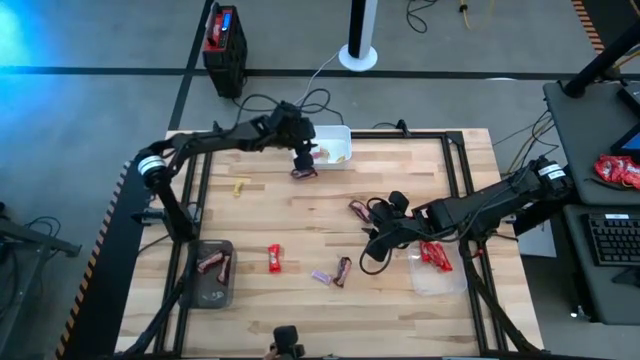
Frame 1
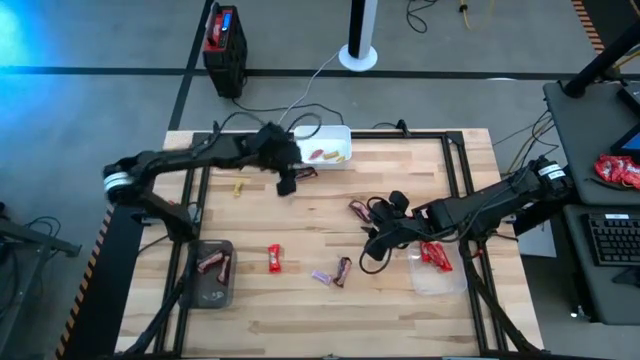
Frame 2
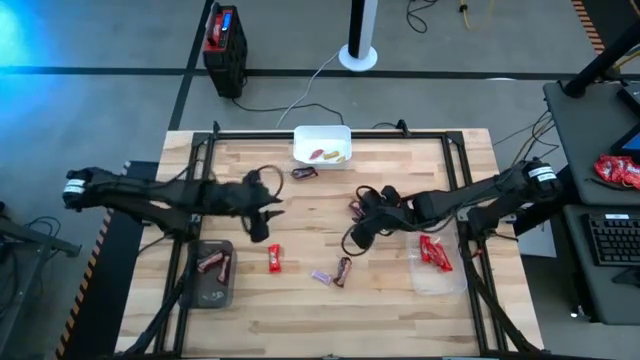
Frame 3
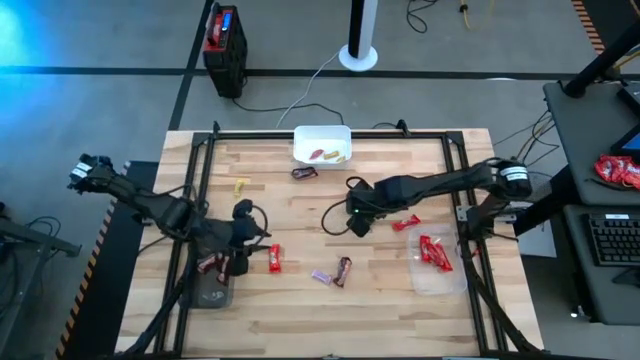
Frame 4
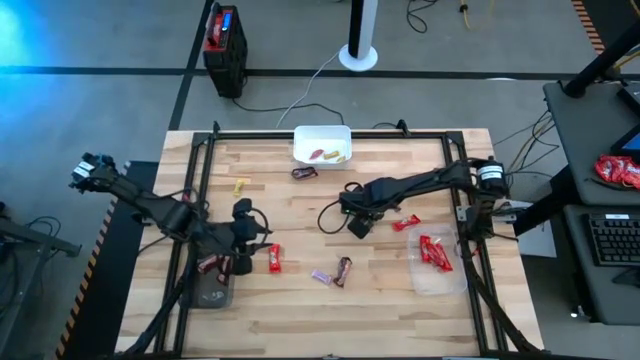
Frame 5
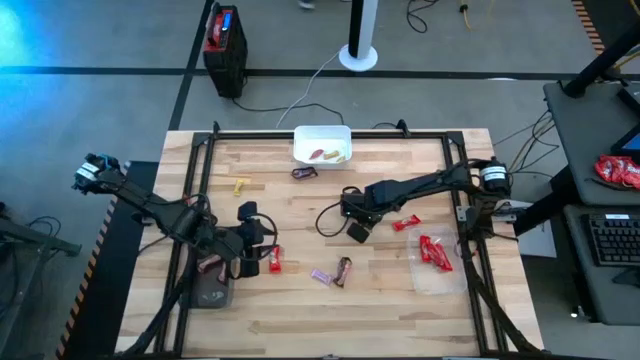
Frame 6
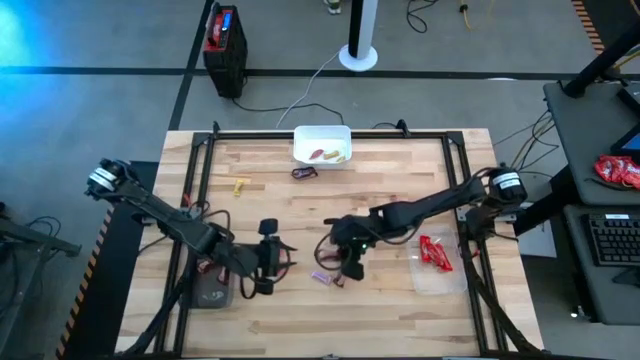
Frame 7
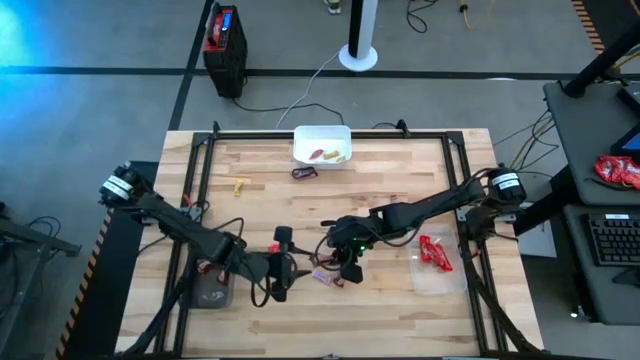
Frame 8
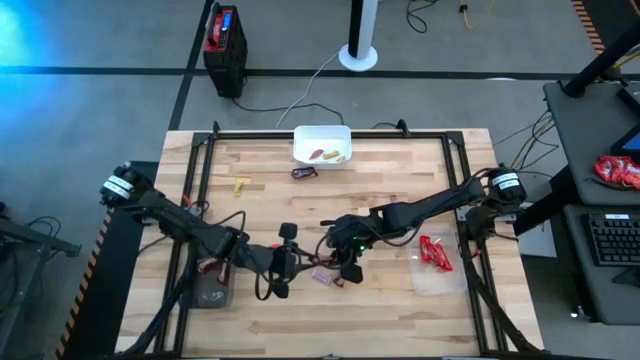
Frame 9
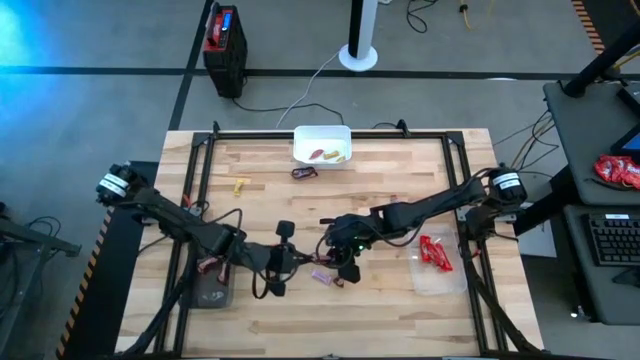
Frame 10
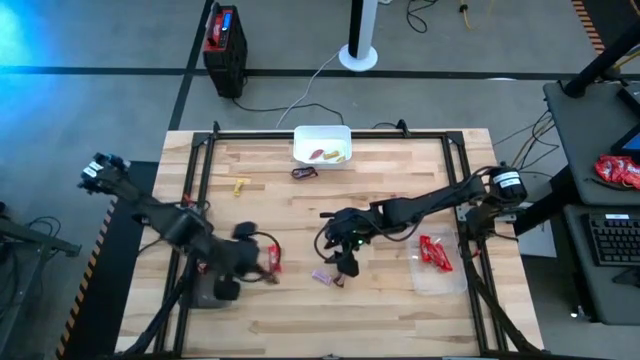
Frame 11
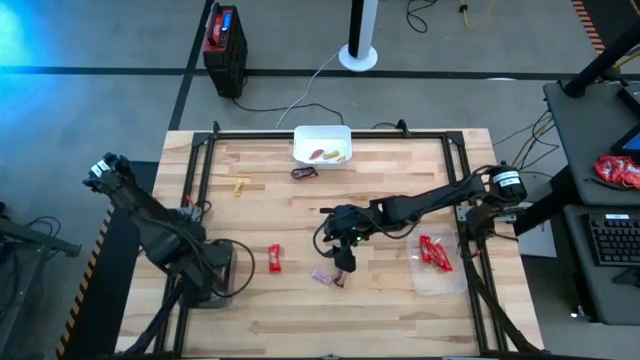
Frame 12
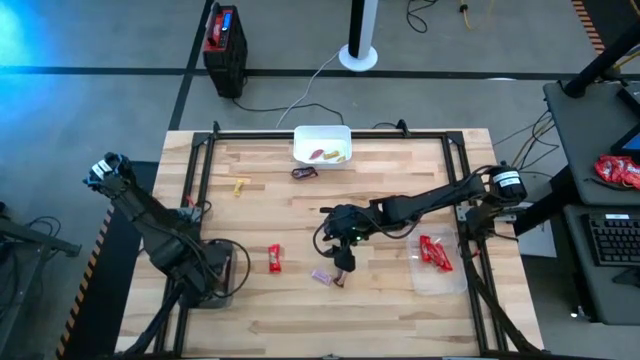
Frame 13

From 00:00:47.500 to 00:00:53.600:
Task: Sort candy by brand, put in halloween buckets
Put the brown chocolate bar into the black bin

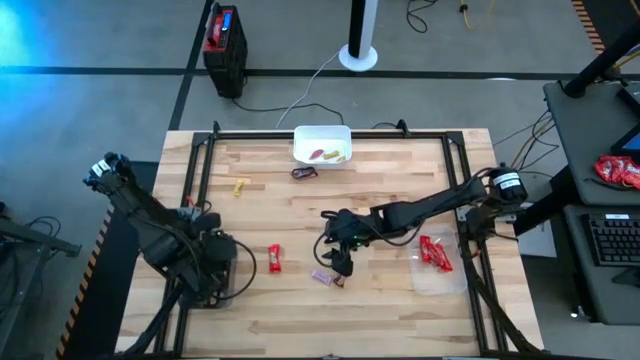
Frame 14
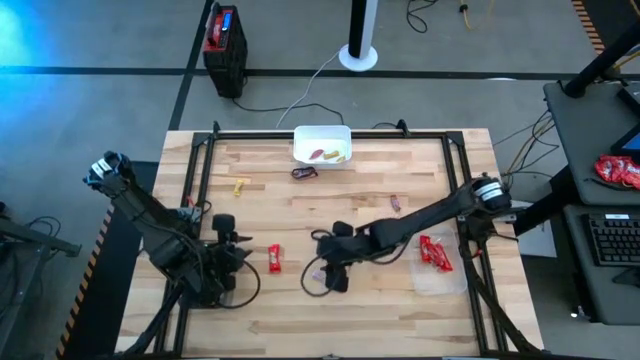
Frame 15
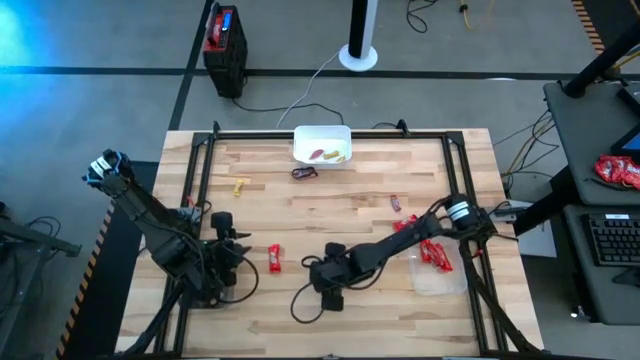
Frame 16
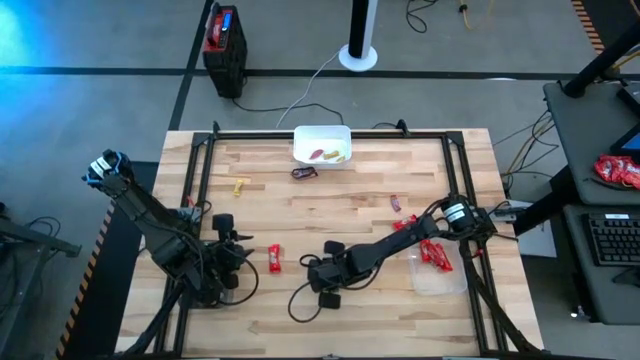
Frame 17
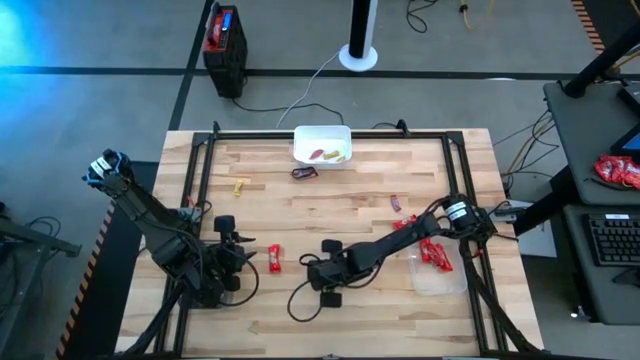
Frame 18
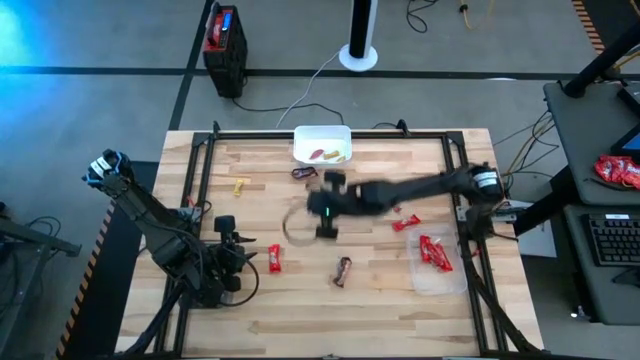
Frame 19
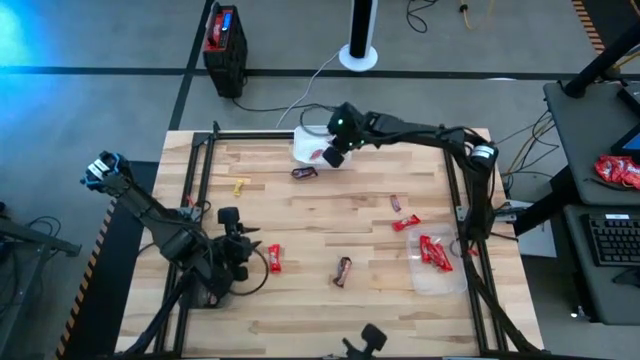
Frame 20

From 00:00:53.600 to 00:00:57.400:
Put the pink candy into the white bin

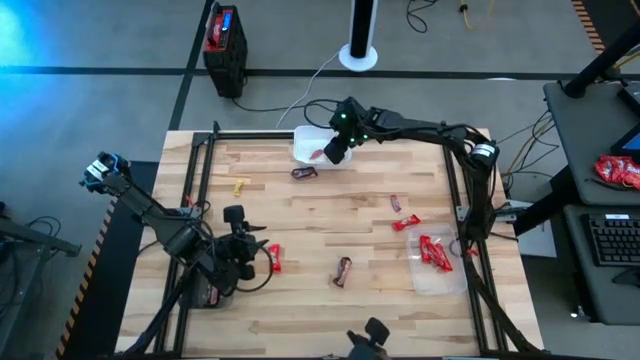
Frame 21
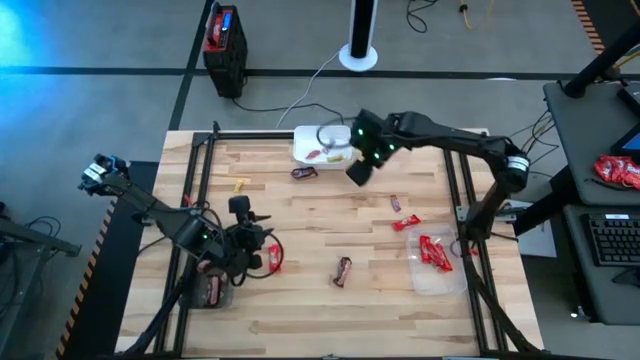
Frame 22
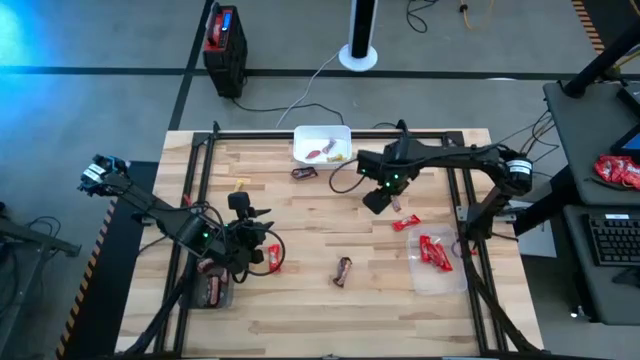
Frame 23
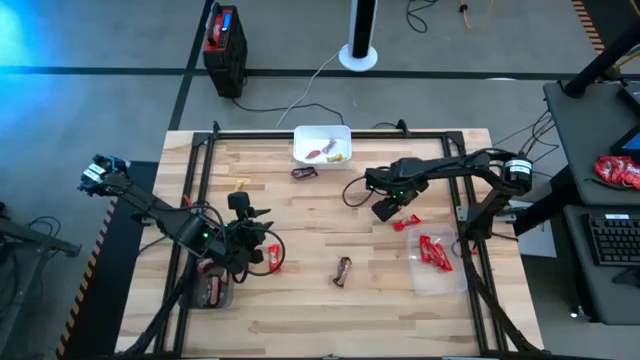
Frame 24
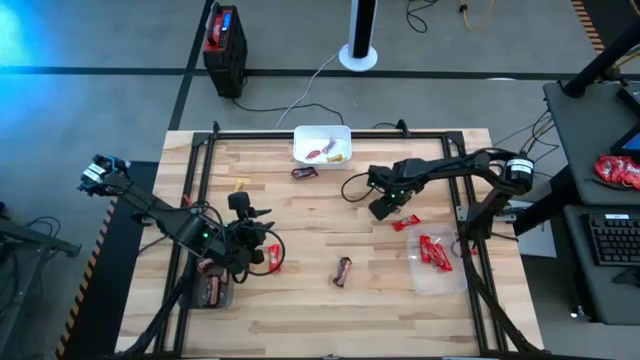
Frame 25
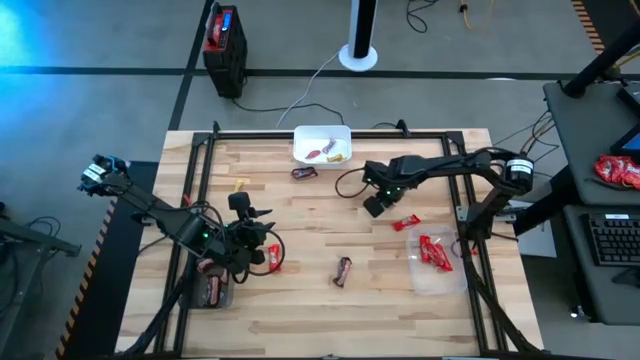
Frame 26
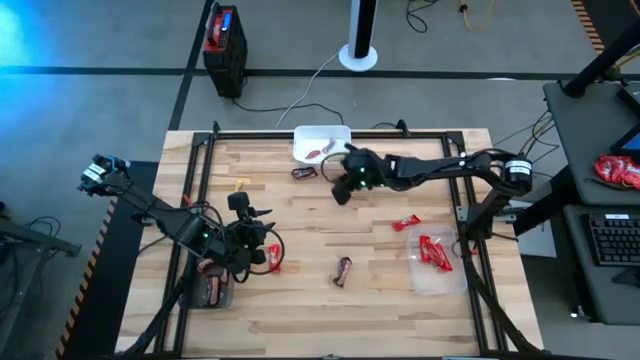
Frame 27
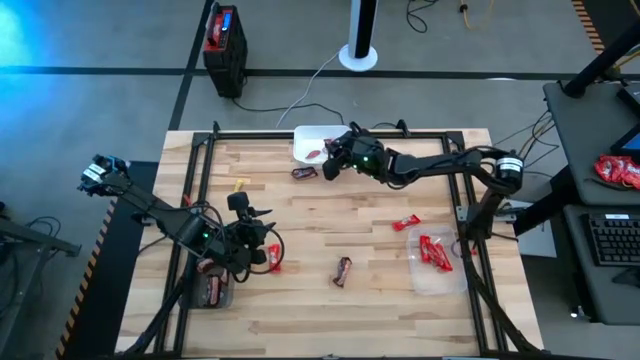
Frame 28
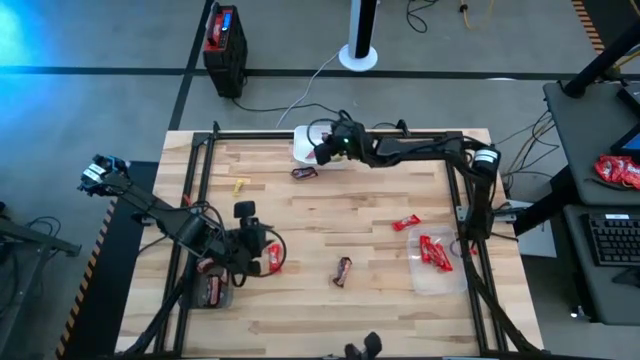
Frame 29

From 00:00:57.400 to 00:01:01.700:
Put the red candy into the white bin

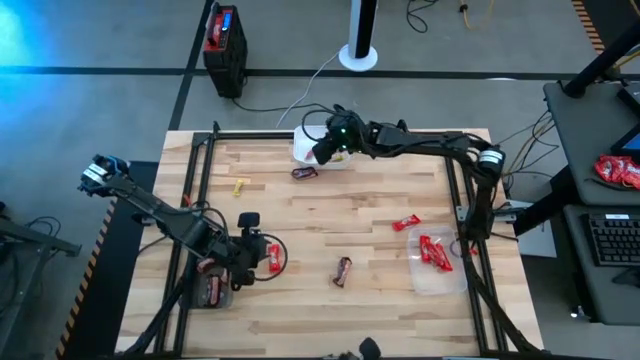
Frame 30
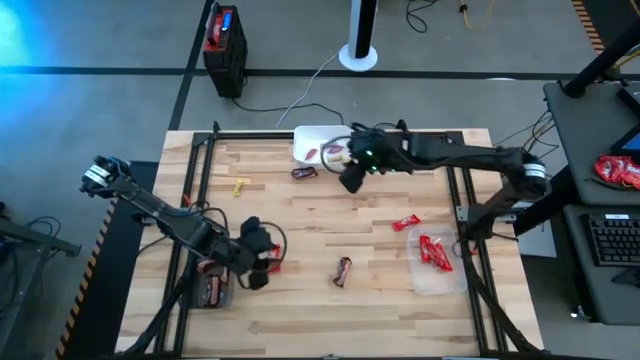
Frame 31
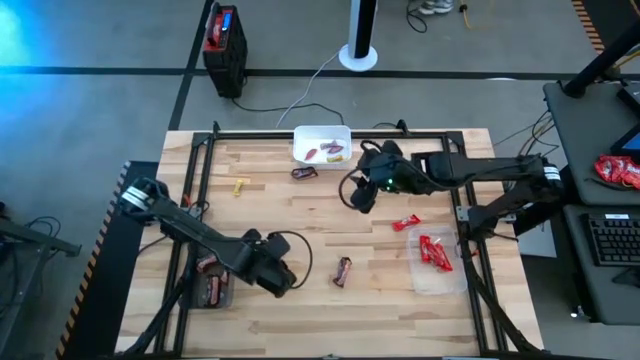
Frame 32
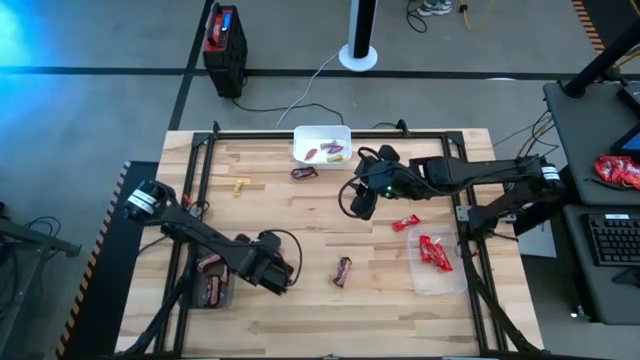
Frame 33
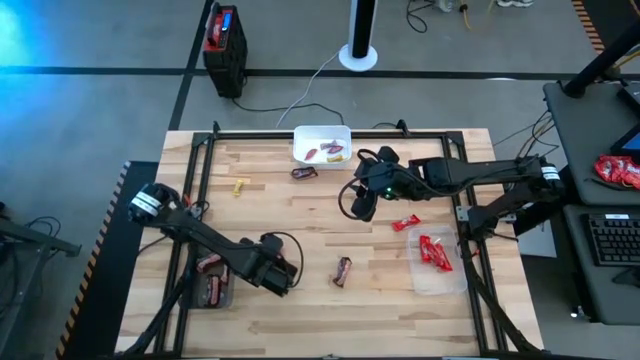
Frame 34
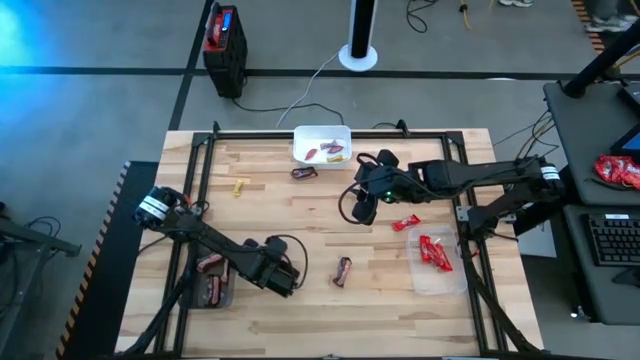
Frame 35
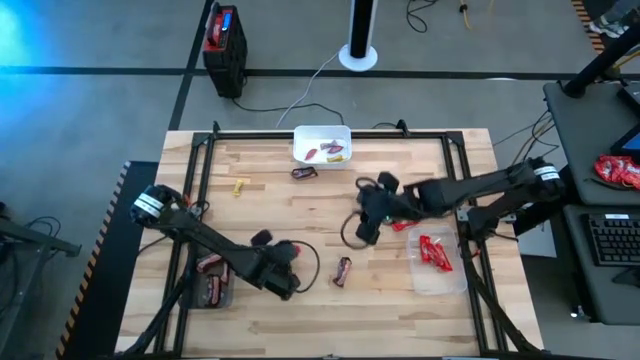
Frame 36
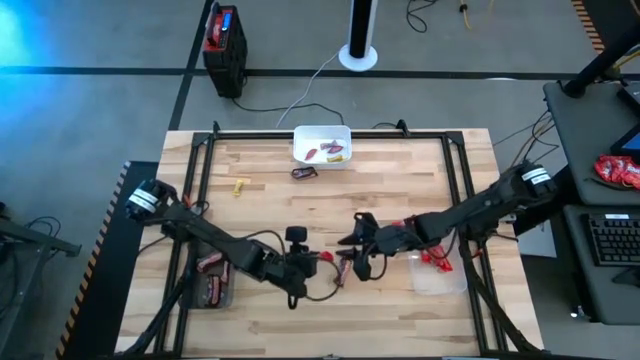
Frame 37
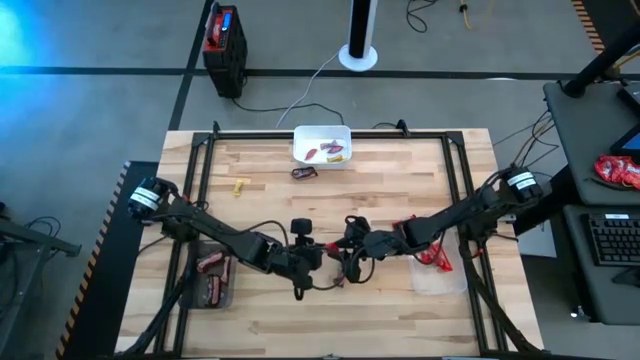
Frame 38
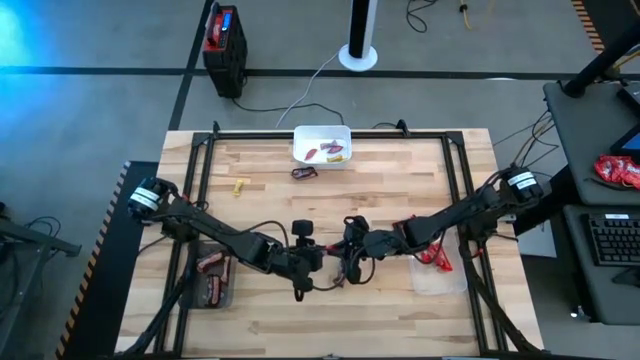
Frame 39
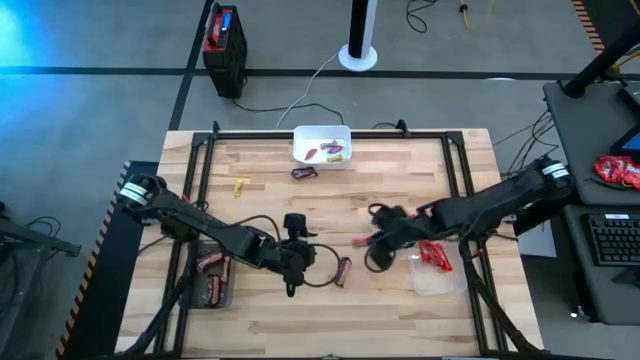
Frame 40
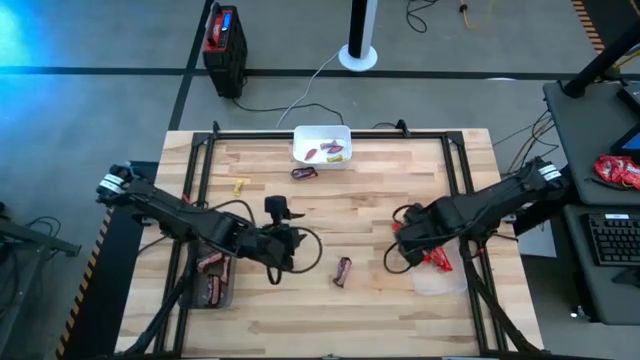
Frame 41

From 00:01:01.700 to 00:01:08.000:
Put the red chocolate bar into the transparent bin
